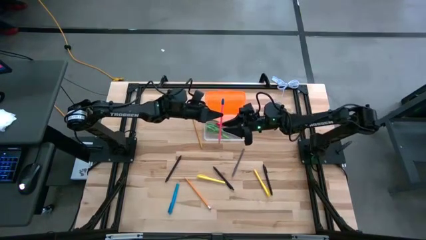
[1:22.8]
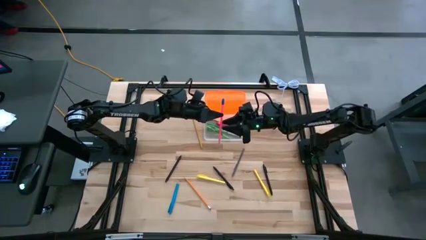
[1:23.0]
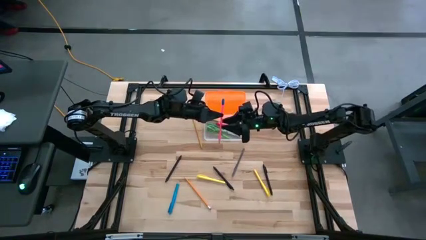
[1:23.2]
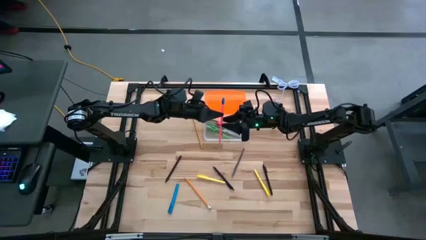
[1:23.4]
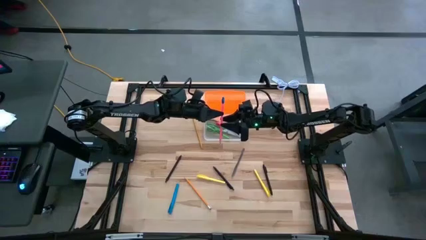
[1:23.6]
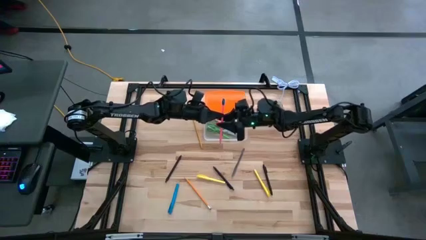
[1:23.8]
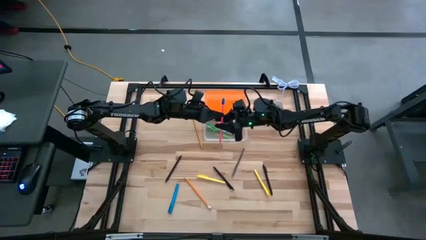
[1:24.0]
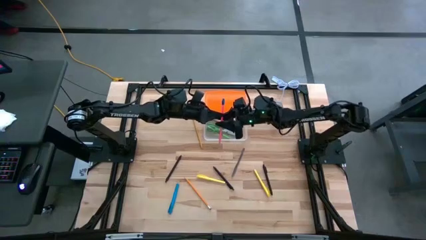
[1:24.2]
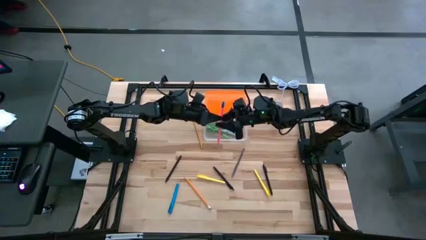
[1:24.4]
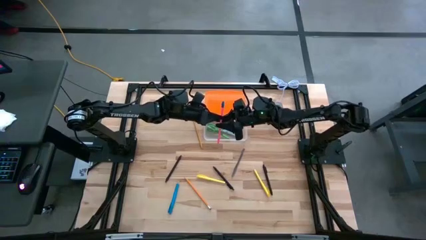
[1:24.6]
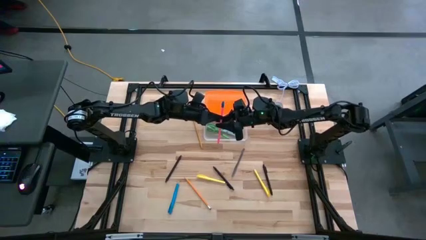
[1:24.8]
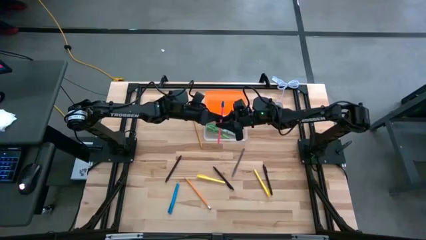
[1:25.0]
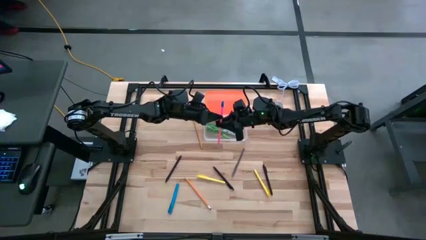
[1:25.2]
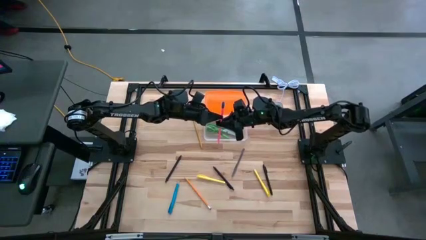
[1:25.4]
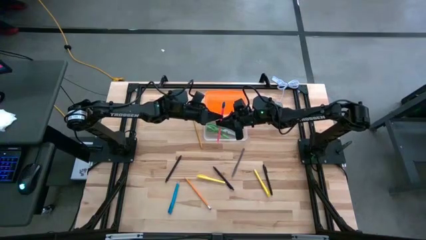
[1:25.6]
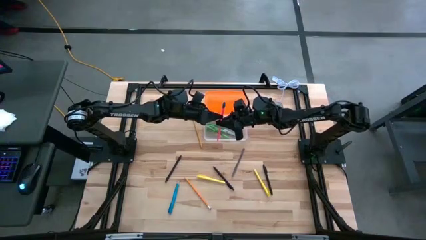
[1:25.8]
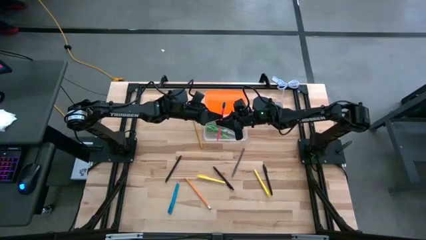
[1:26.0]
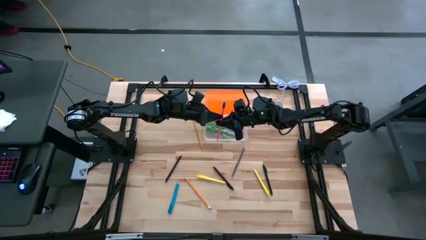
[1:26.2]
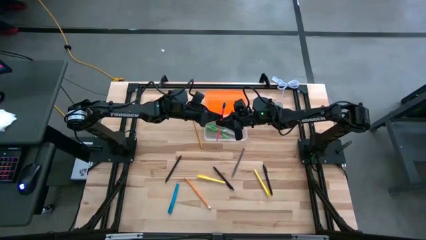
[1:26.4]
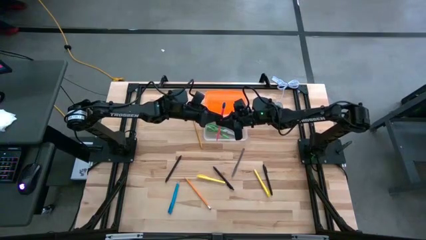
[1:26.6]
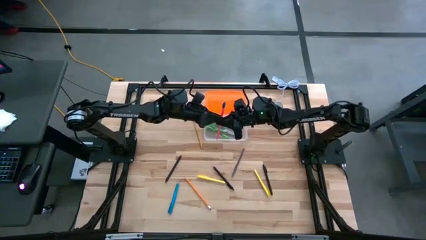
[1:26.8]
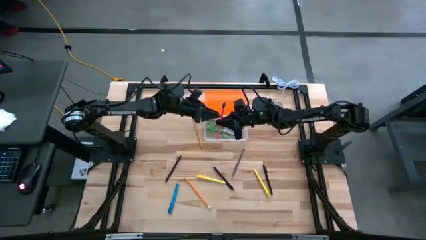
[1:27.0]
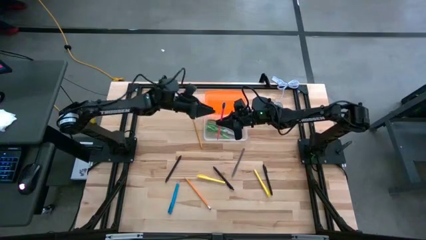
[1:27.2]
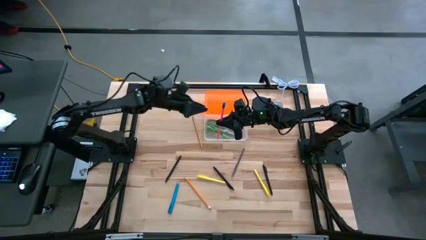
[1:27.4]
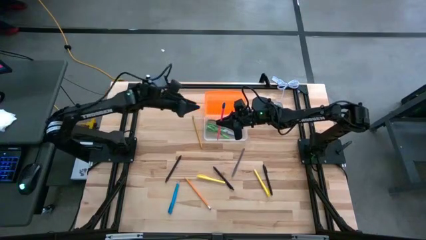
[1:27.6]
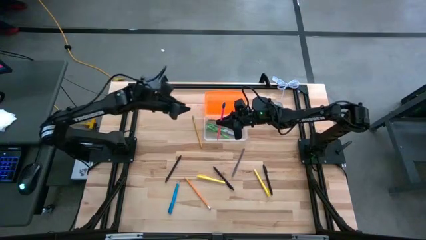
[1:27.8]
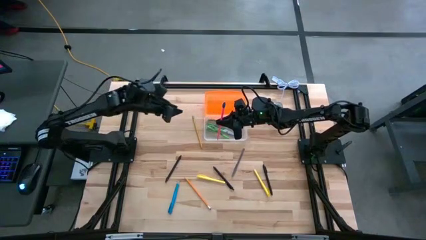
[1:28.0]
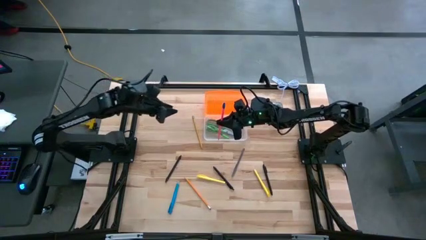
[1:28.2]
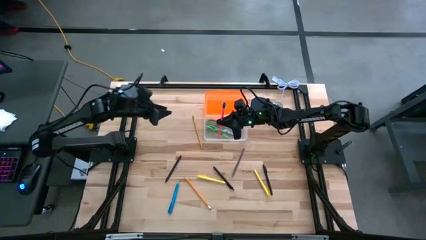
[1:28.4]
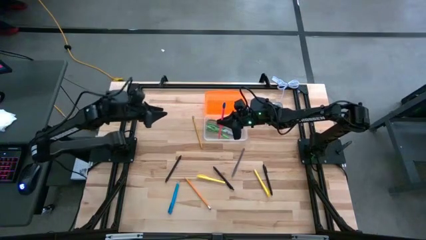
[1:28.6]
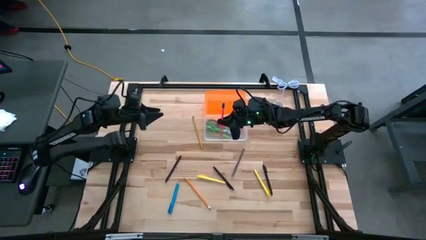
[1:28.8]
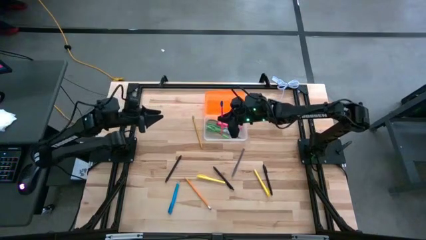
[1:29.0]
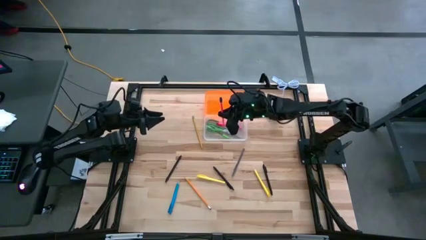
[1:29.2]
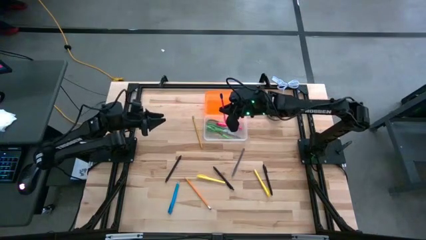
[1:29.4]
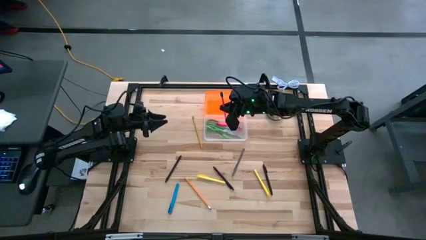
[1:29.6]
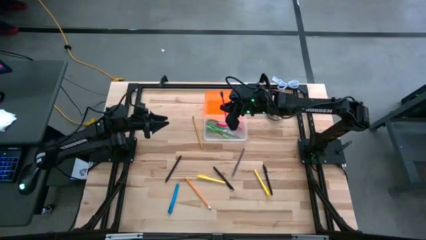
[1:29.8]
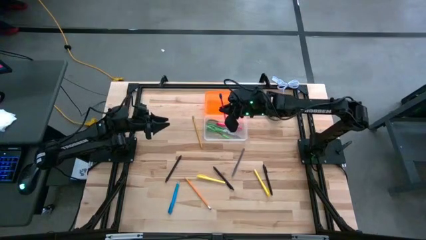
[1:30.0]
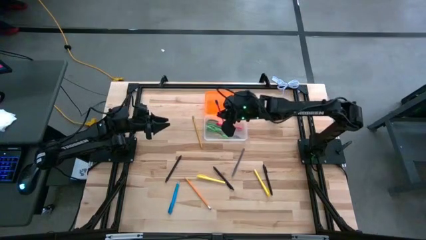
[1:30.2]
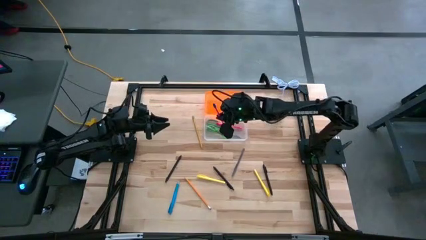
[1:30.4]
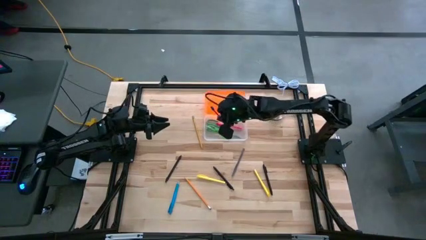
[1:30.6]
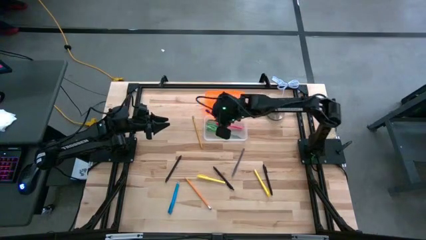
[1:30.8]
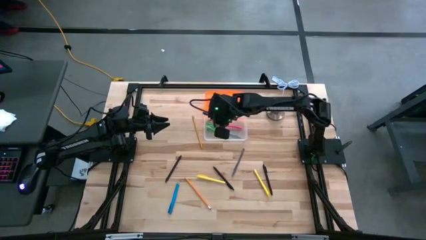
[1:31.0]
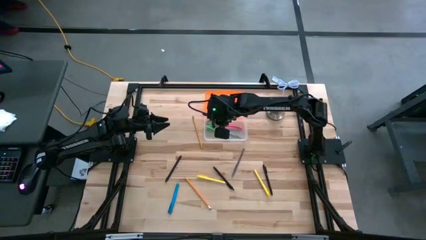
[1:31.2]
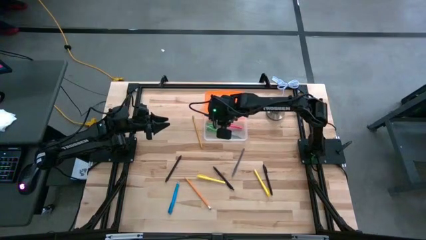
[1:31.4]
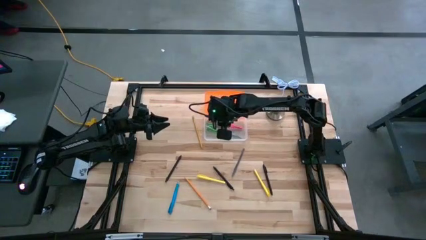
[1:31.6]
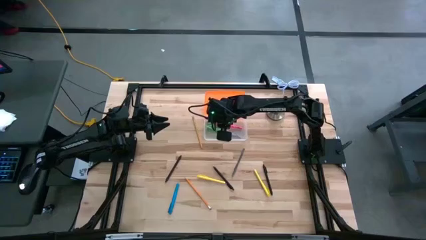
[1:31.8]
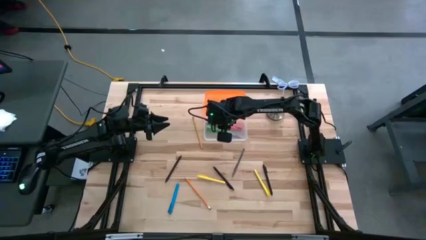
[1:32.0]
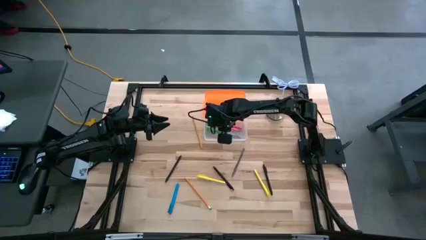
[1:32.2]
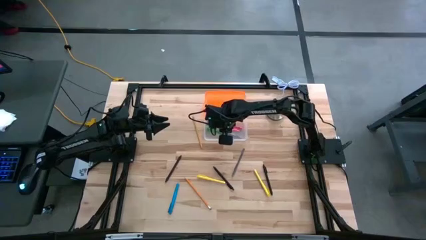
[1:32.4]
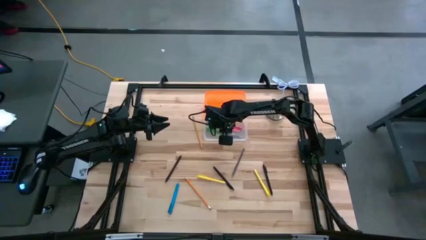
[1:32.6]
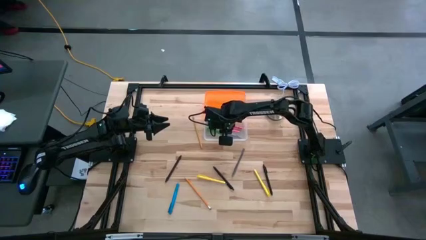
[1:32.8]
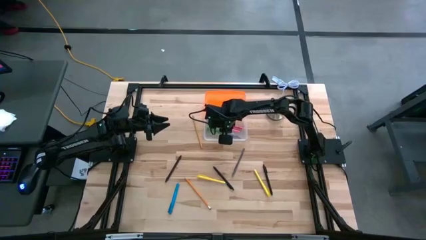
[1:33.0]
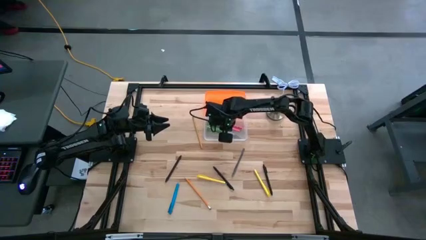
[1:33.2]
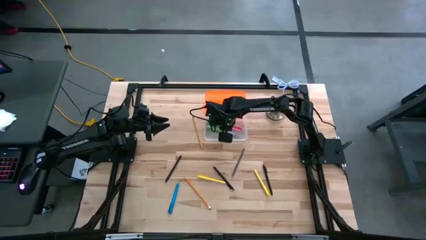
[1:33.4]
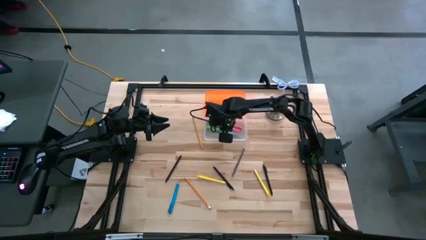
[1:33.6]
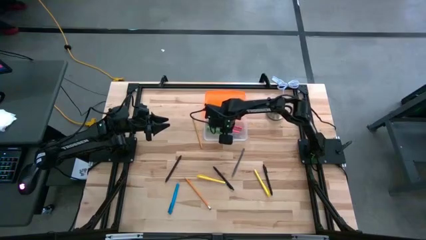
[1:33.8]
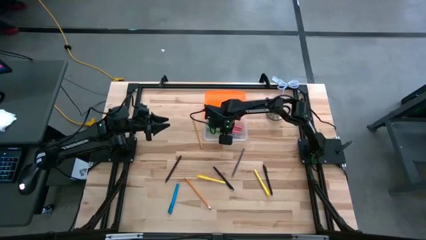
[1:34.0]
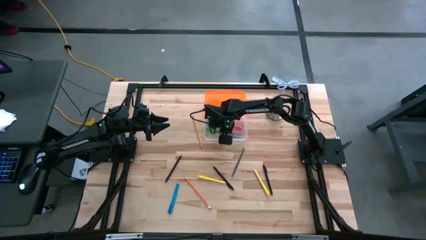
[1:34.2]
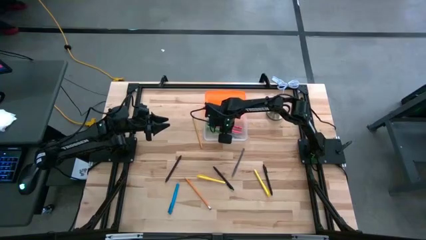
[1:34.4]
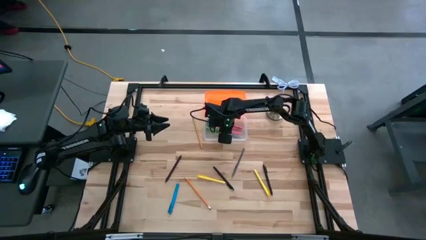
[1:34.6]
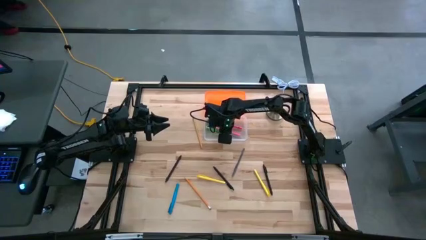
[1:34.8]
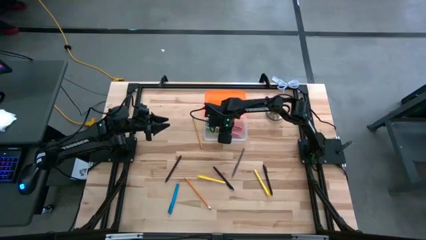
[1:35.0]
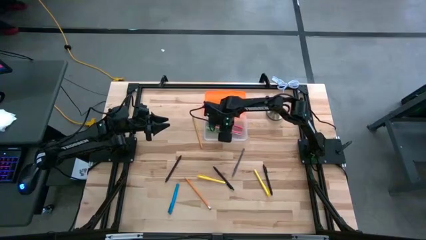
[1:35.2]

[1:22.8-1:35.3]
Task: Pick & place school supplies into a supply box
Put the pink pencil into the supply box

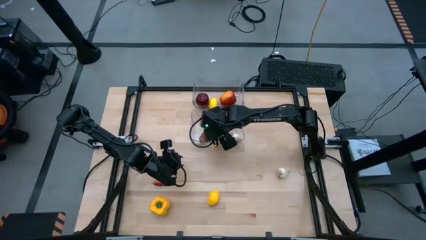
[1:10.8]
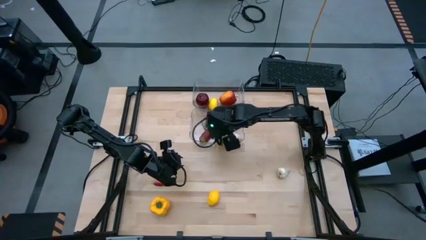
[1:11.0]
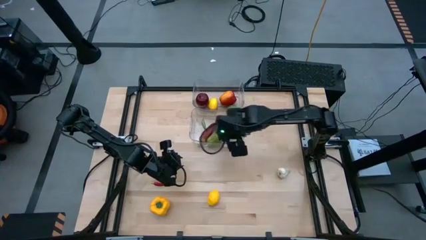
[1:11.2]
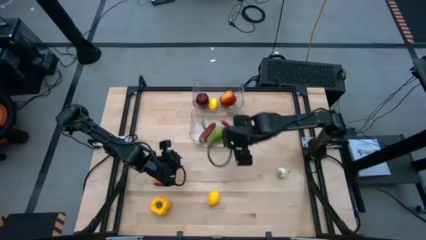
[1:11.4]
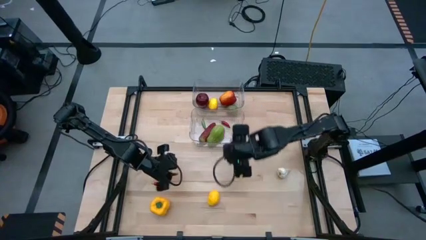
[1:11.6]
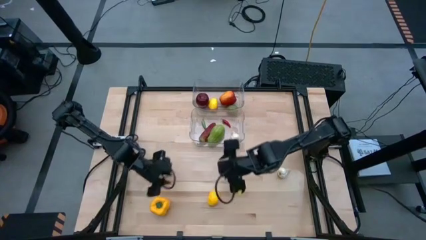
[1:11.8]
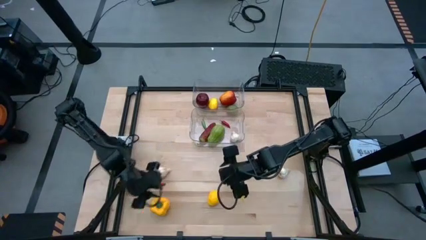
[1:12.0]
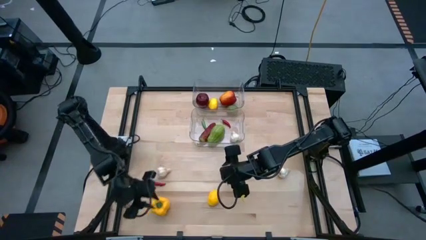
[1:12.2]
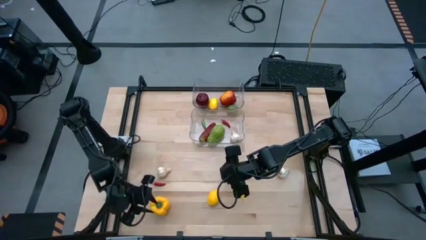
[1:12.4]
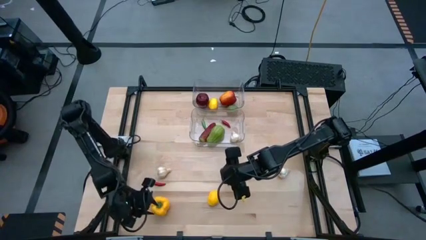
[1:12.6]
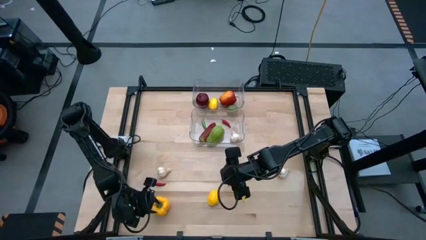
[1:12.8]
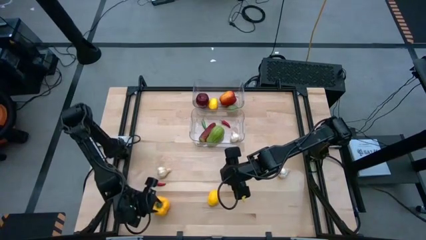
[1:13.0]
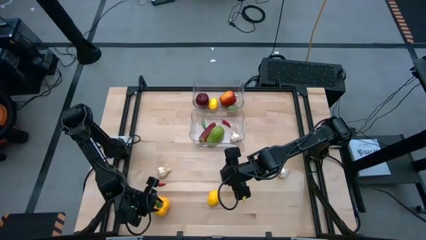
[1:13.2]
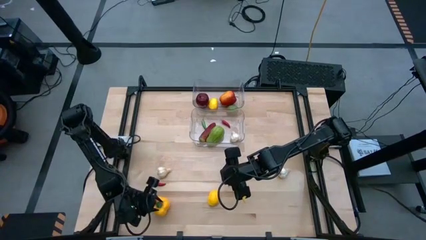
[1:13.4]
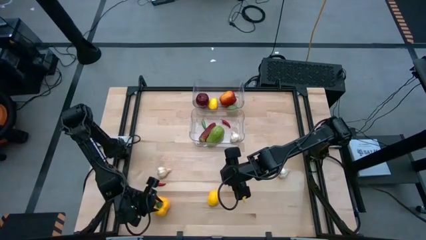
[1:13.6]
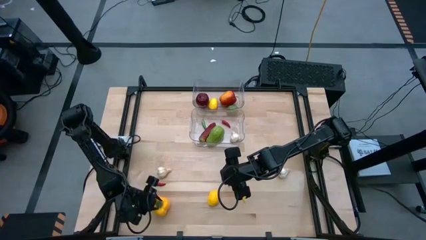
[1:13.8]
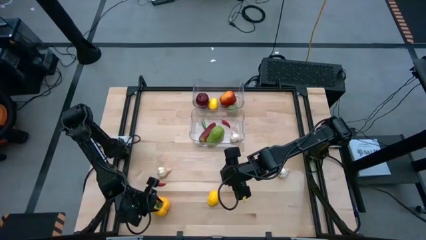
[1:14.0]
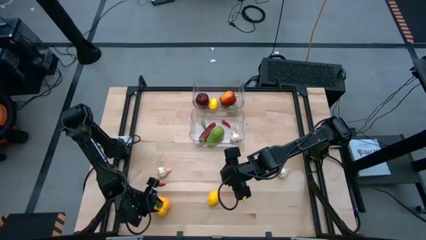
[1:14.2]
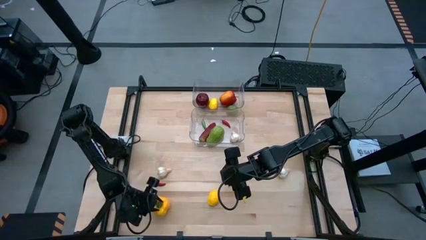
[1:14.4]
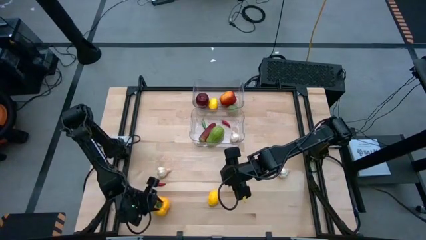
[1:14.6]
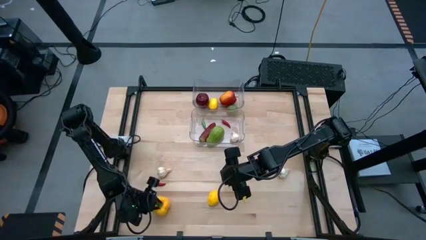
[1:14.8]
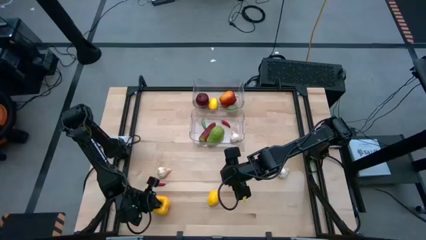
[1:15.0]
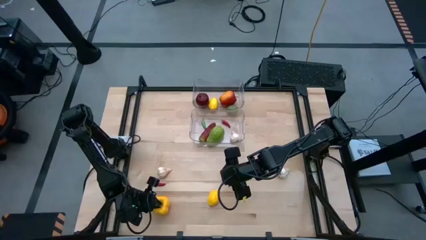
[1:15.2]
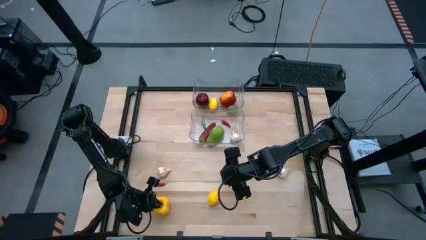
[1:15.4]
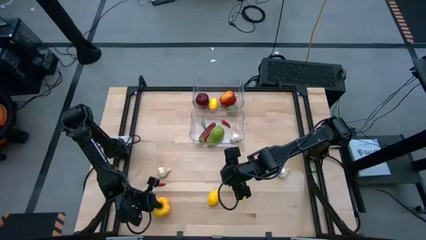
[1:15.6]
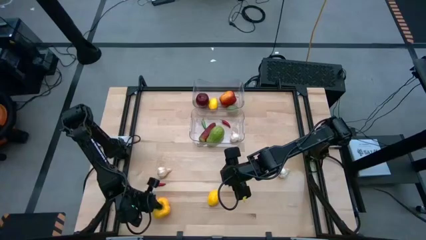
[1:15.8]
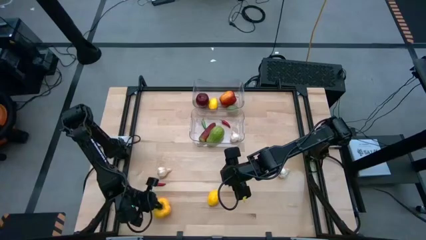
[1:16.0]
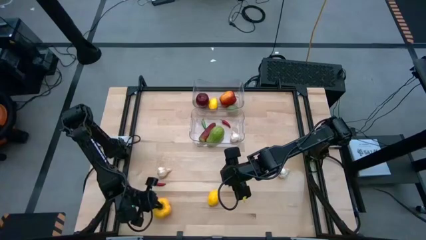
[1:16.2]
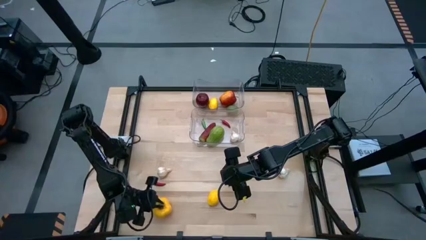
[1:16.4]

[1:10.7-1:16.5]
Task: Sort produce into baskets
Put the yellow bell pepper into the bottom transparent bin
